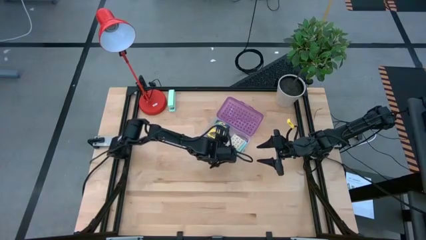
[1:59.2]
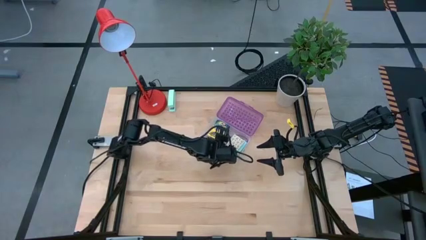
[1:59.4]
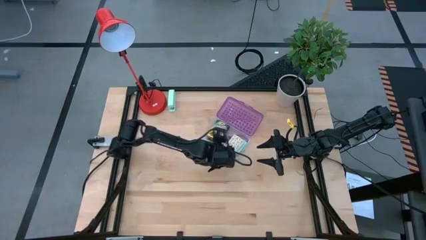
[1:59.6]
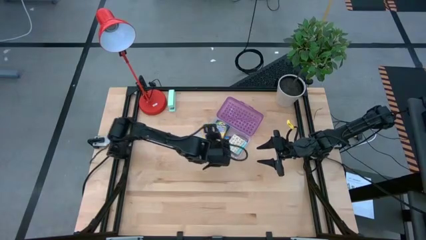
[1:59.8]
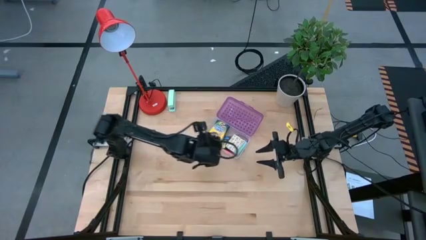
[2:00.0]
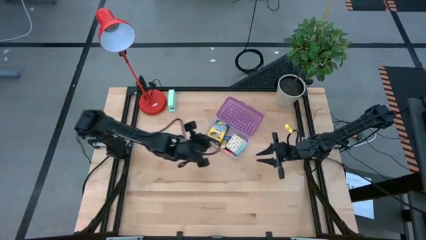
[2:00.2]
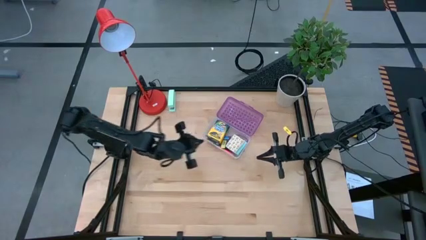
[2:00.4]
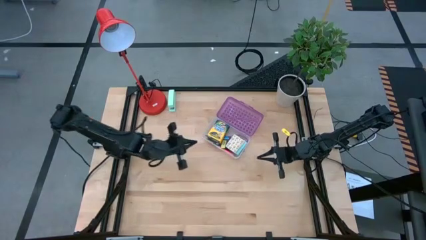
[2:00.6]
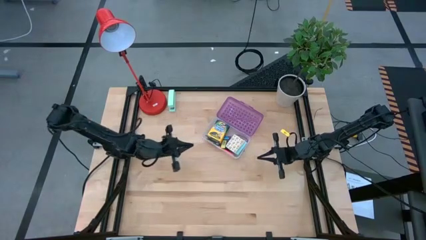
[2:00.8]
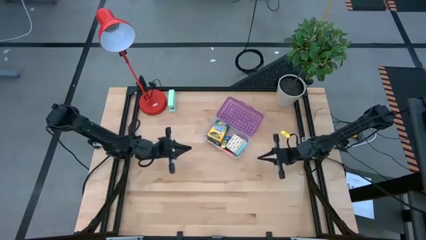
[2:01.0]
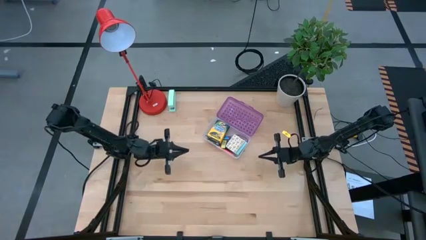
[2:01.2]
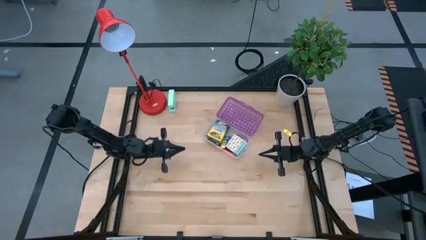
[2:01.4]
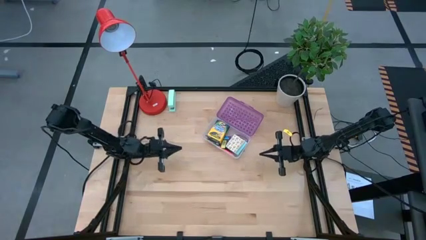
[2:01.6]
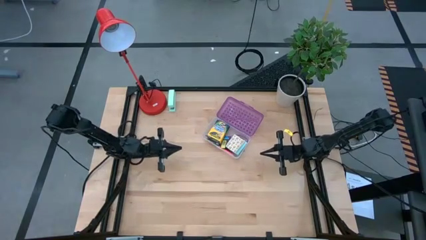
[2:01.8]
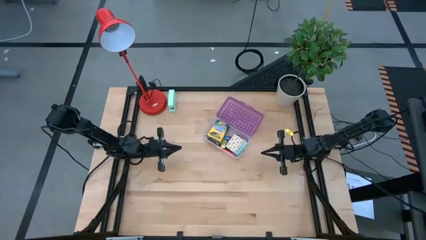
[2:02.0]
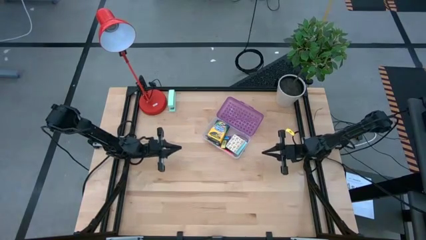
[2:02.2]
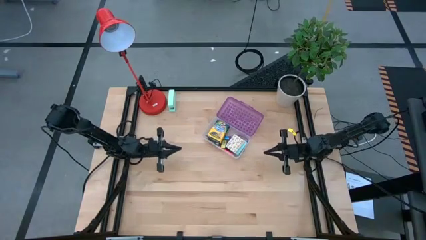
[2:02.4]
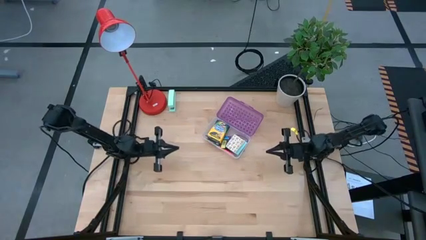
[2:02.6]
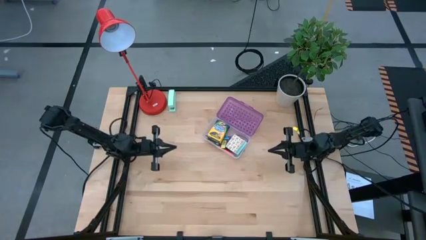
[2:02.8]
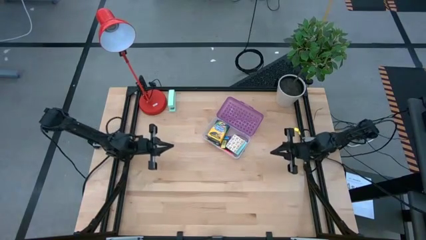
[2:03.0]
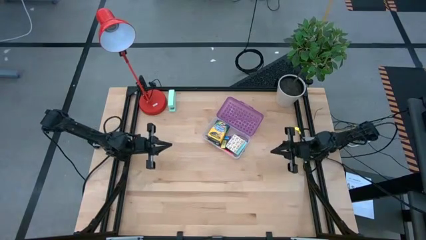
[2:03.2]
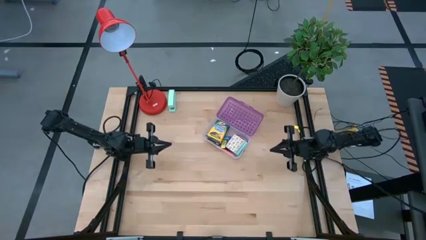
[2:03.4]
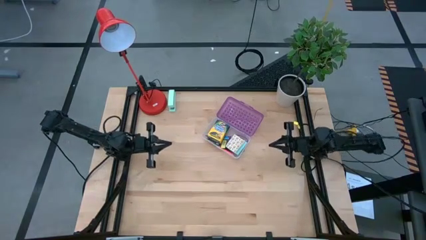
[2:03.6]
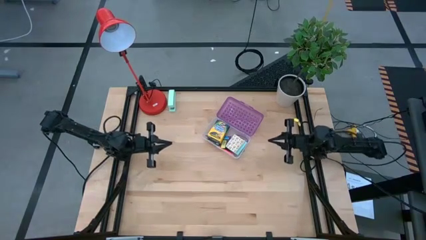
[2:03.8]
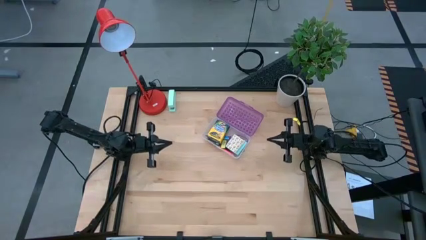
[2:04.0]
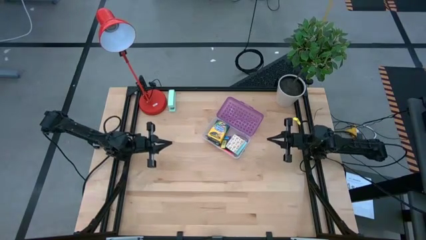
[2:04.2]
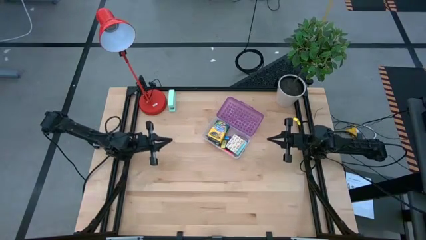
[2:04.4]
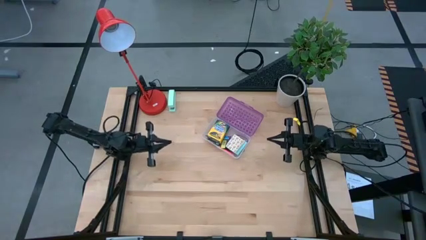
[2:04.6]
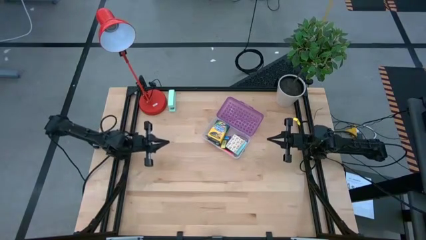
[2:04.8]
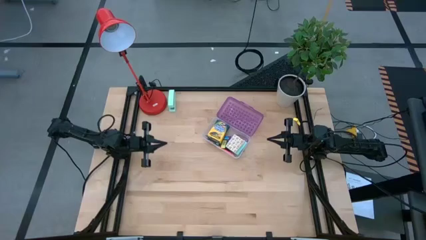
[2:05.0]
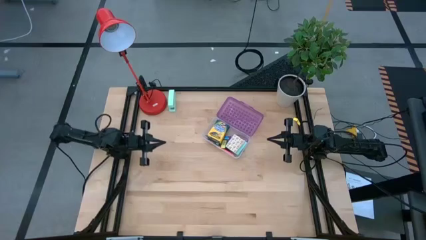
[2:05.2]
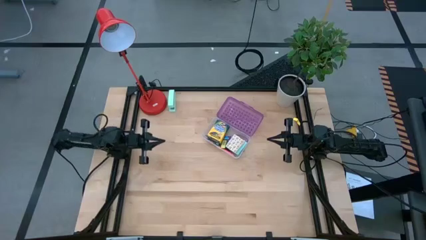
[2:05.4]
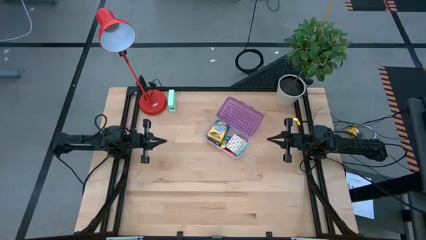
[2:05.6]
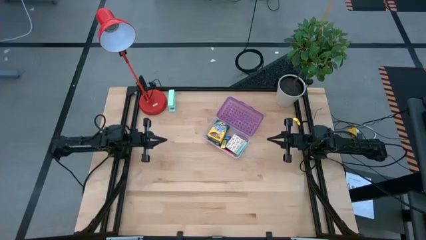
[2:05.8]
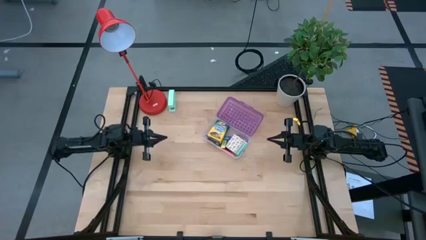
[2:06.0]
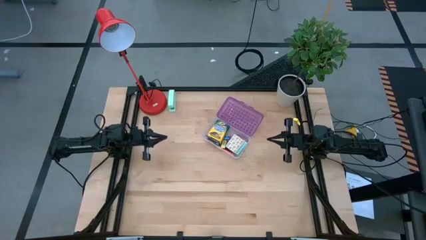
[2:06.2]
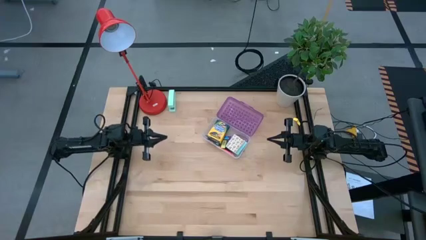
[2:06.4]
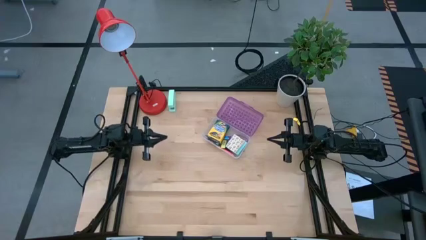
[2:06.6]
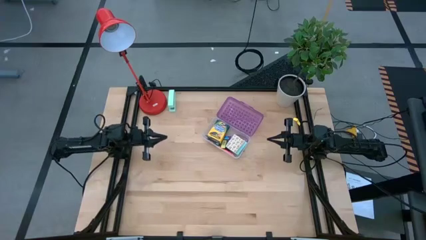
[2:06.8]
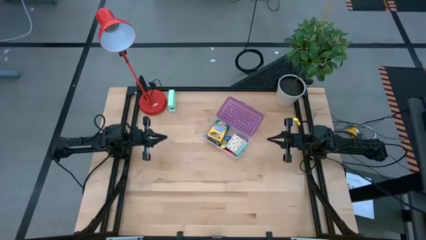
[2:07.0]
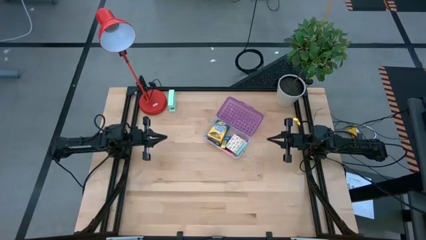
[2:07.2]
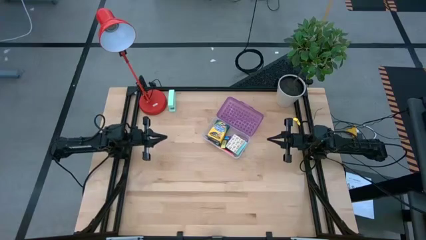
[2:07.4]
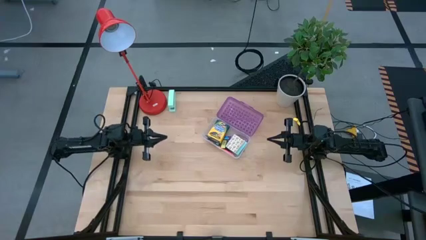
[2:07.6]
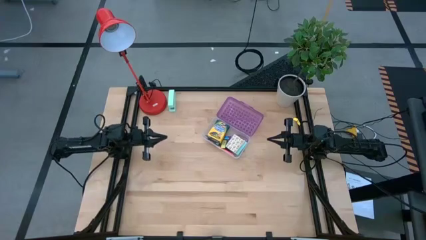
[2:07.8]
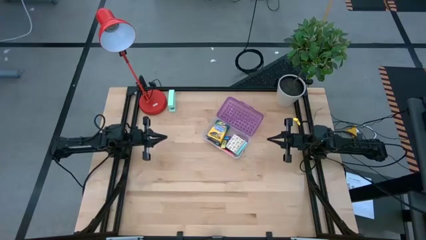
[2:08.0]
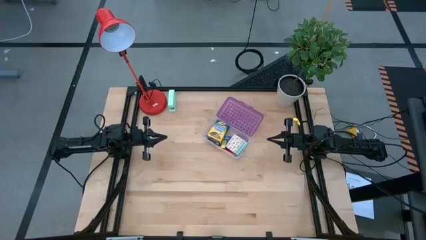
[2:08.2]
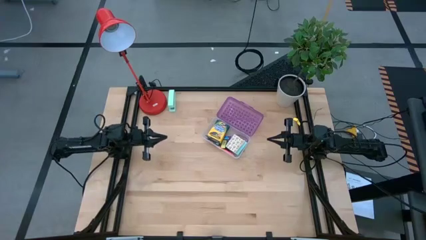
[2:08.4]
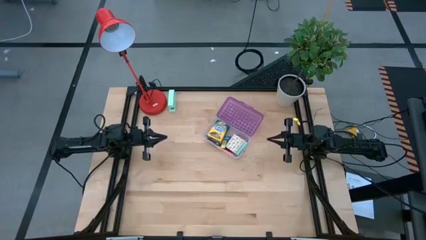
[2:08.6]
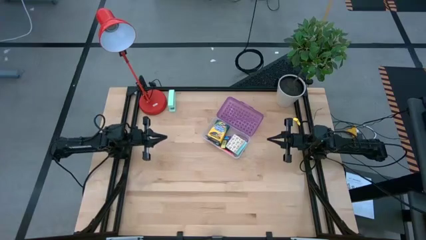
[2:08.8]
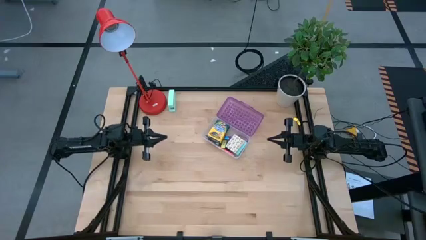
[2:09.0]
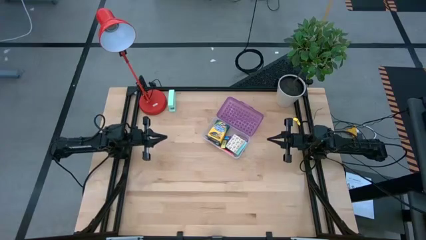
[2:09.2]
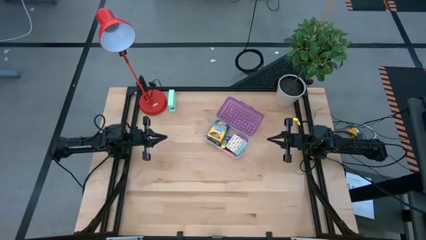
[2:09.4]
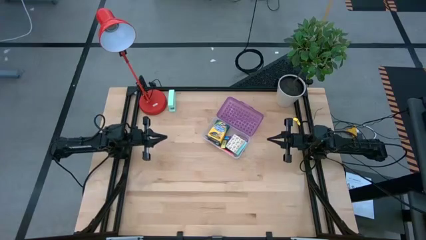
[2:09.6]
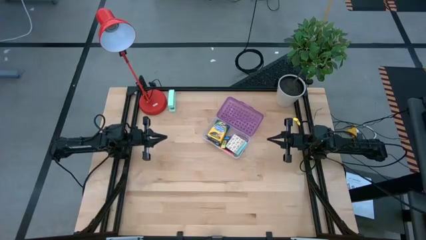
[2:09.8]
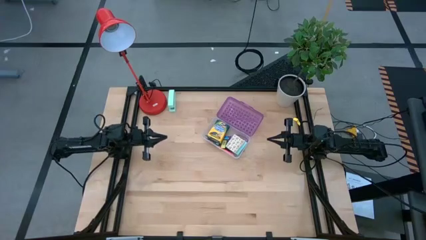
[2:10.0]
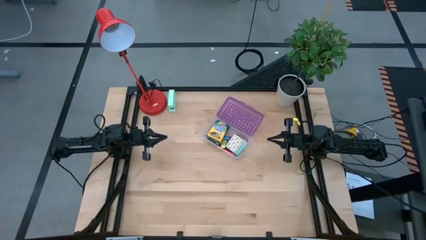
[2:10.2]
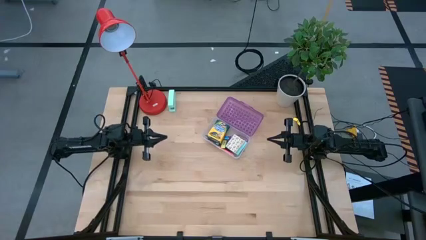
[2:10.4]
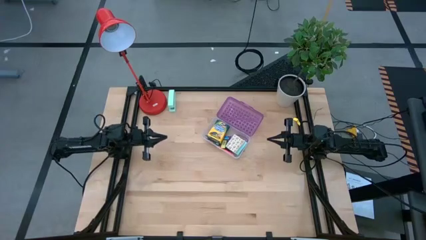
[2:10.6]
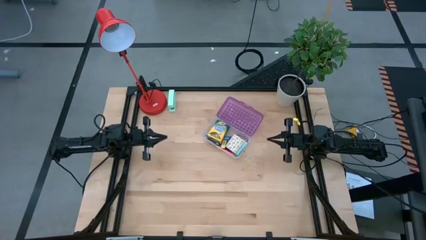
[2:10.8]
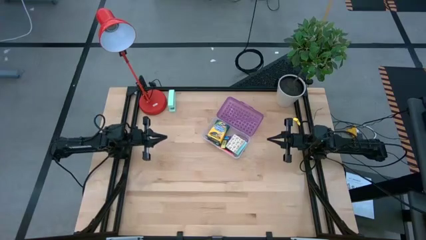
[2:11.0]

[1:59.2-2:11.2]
Task: Pack school essentials
Return to Home Position
